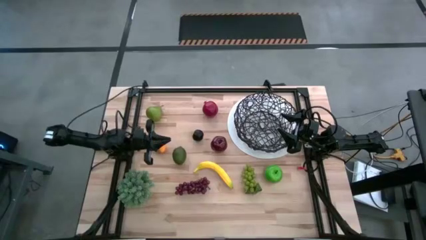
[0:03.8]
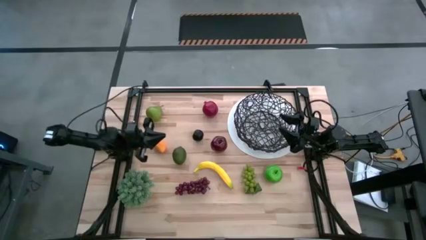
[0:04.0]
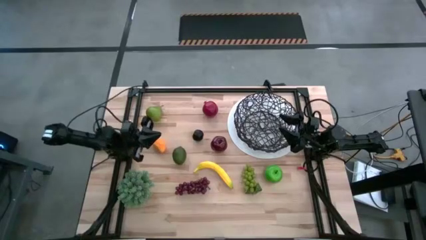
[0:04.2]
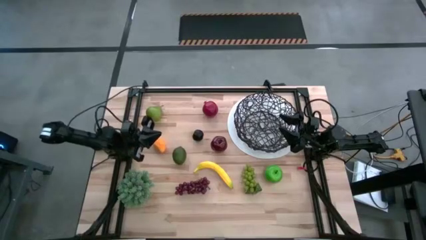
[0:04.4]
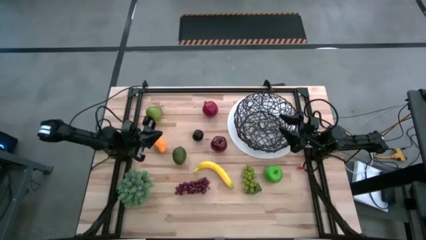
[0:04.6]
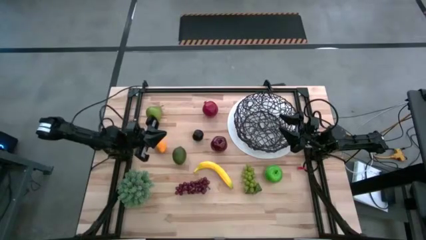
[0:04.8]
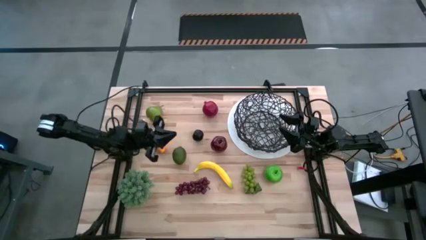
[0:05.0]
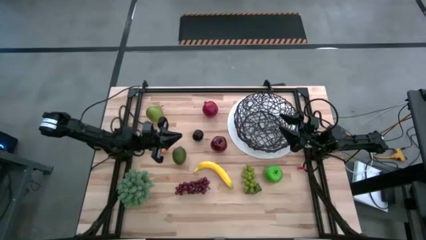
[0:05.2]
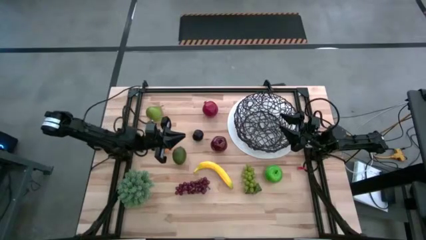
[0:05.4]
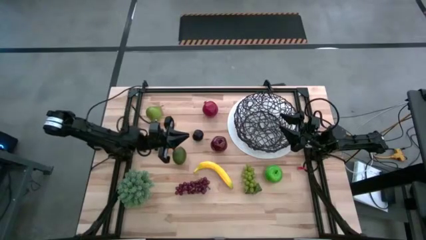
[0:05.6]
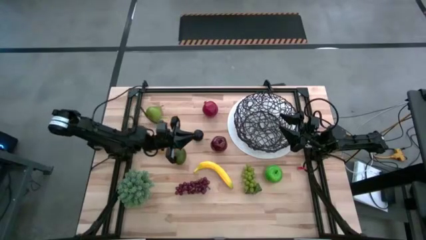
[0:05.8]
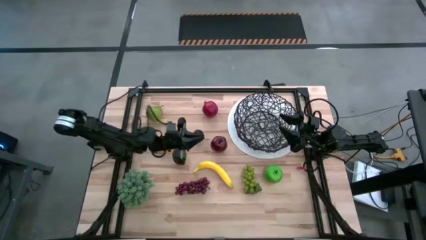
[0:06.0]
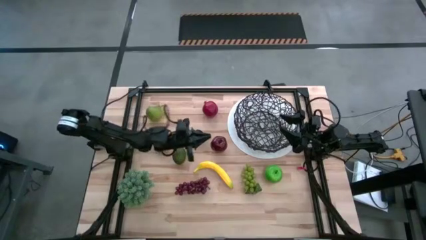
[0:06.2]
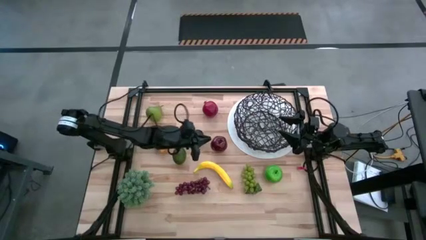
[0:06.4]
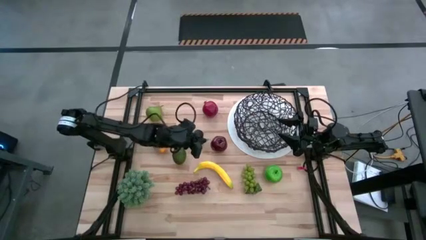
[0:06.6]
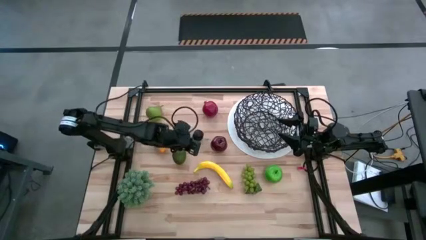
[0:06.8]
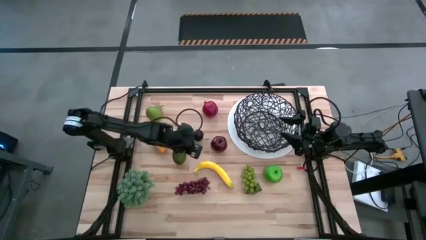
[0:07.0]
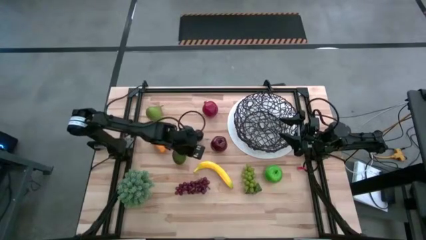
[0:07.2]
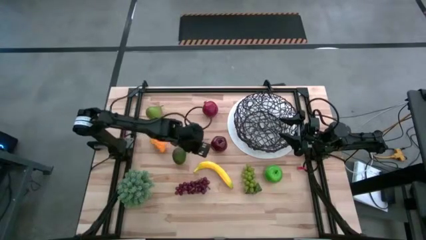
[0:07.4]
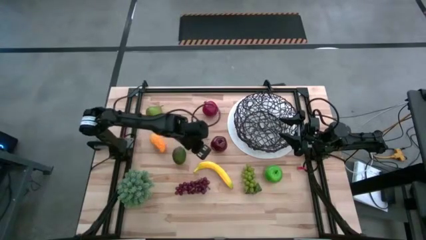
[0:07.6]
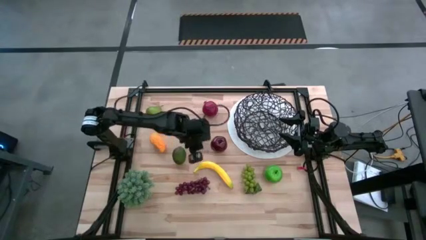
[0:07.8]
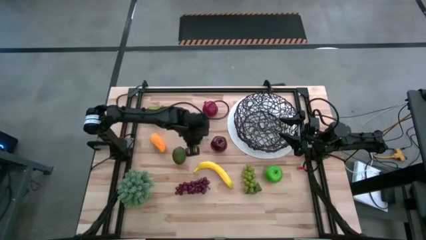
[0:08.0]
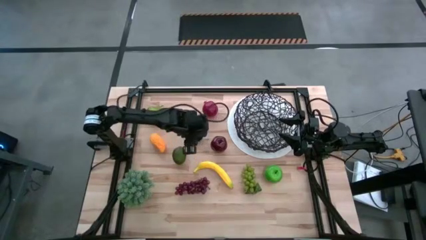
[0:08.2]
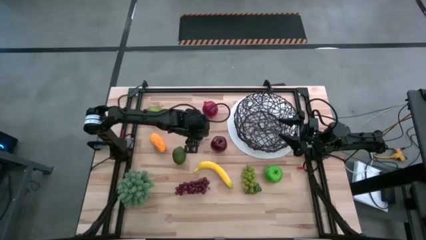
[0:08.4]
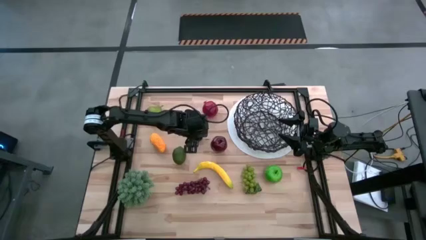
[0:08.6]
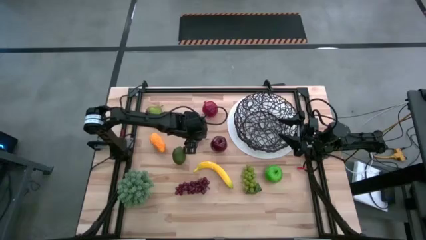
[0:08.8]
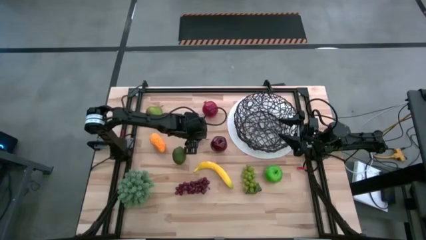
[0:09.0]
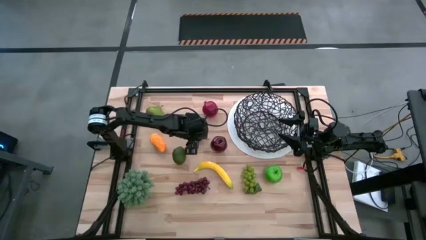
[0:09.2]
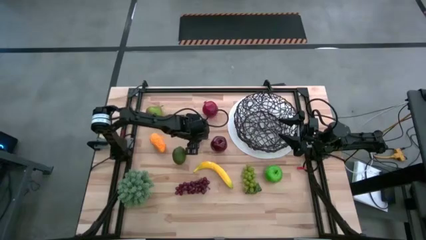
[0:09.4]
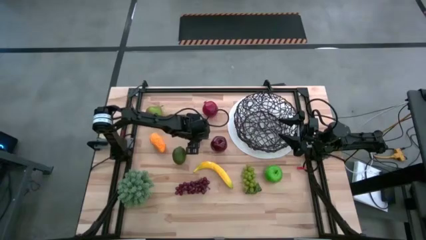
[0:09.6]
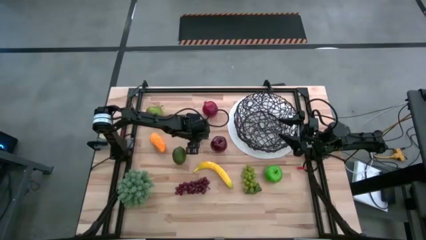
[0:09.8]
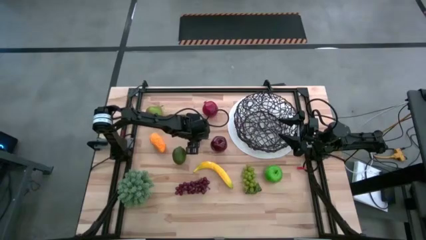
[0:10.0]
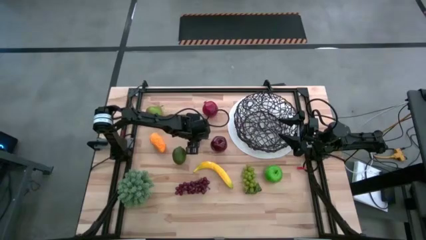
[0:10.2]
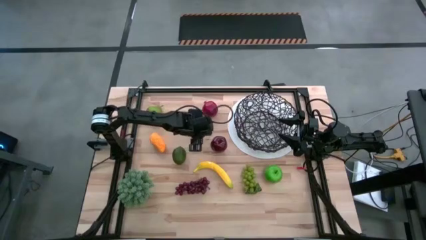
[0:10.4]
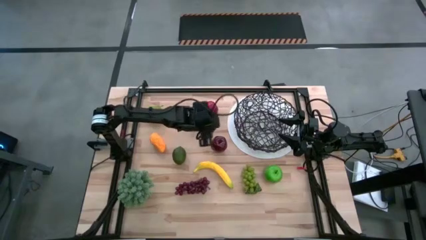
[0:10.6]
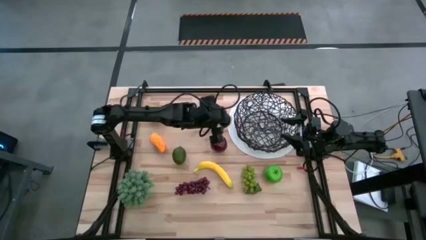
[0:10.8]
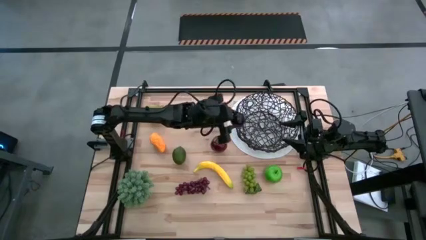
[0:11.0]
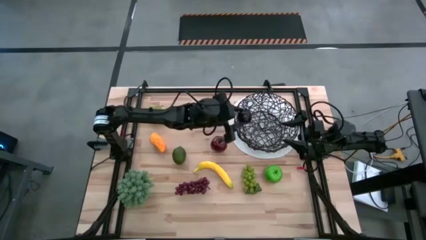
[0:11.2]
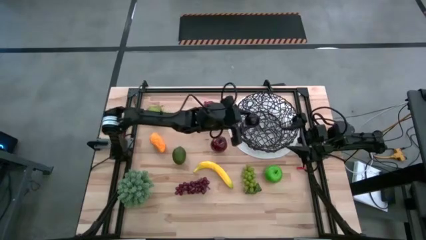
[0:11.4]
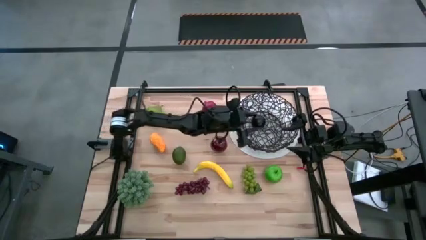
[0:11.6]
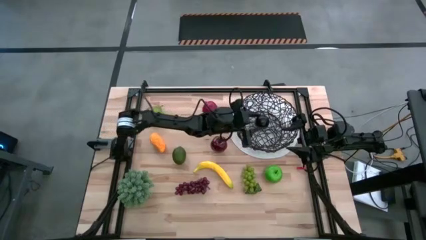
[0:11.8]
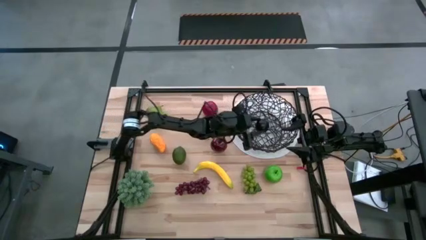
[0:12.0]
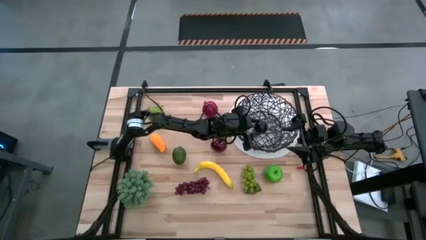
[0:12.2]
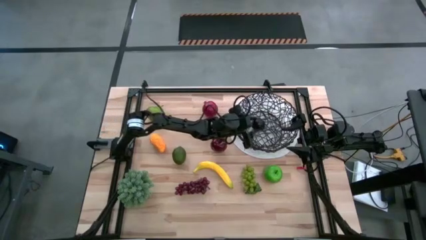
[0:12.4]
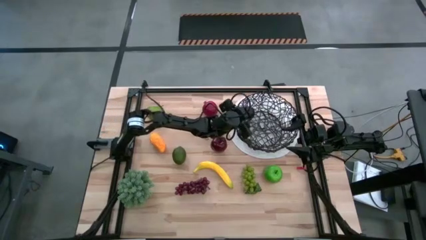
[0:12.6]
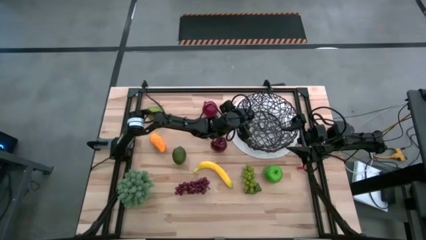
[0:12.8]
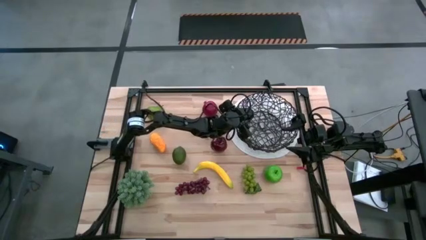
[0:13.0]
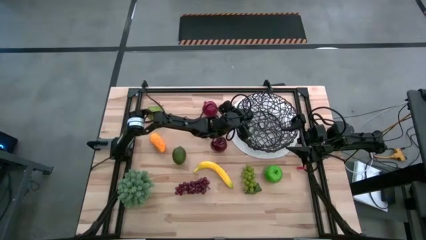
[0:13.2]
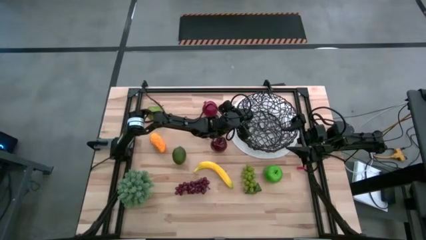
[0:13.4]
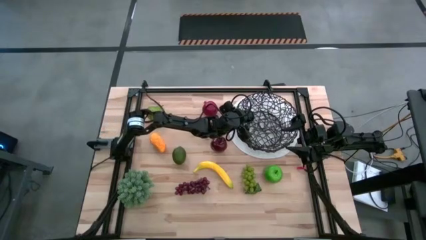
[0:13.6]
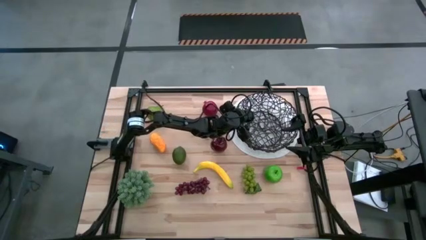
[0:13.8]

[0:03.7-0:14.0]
Task: Build produce basket
Put the purple plum into the wire basket
